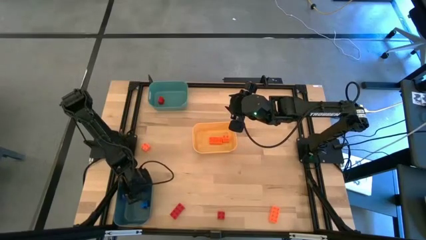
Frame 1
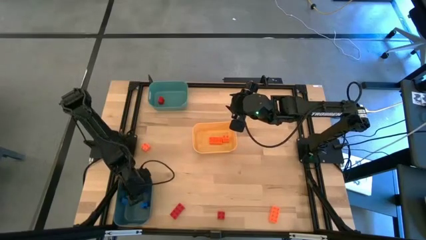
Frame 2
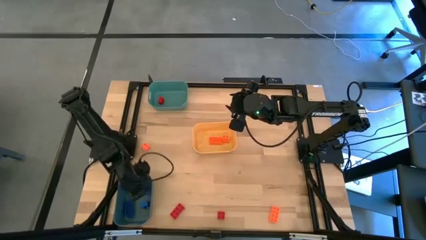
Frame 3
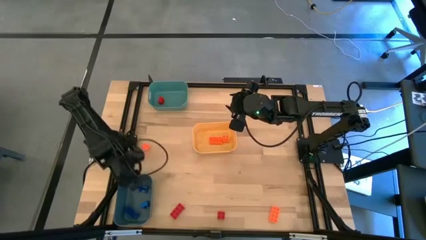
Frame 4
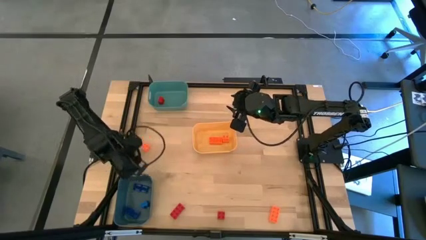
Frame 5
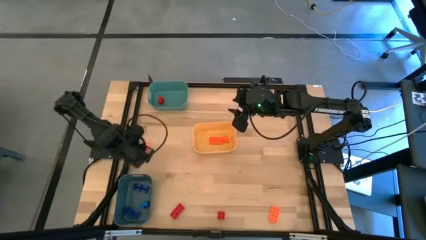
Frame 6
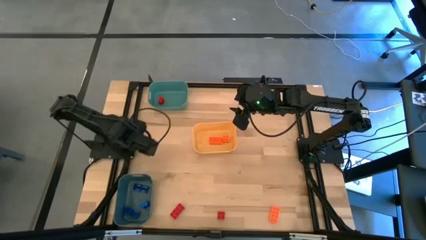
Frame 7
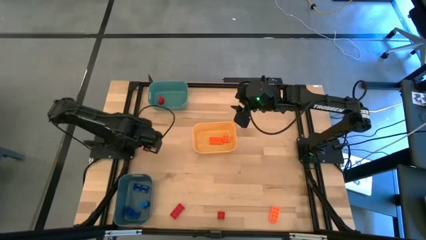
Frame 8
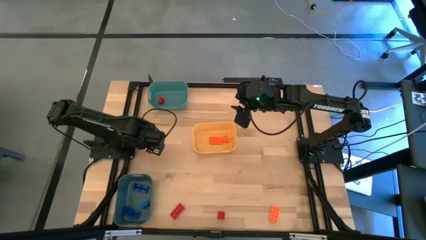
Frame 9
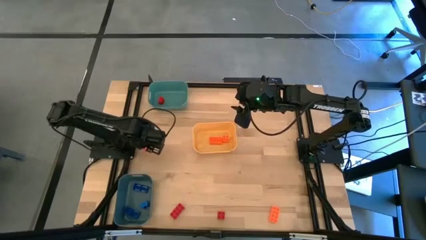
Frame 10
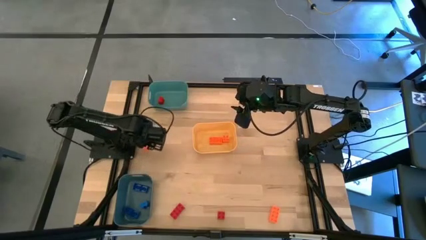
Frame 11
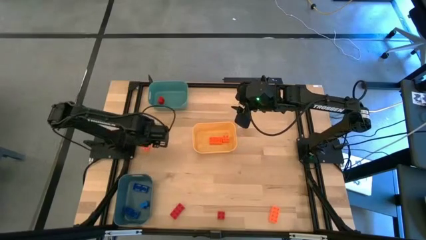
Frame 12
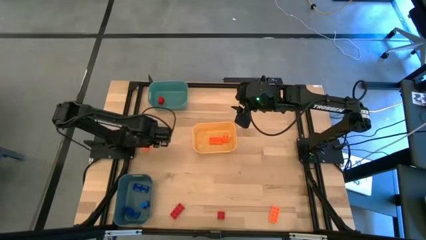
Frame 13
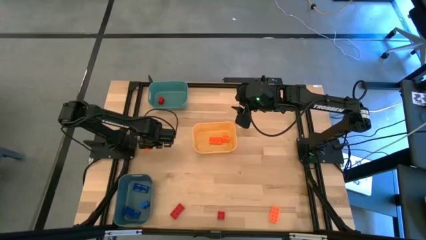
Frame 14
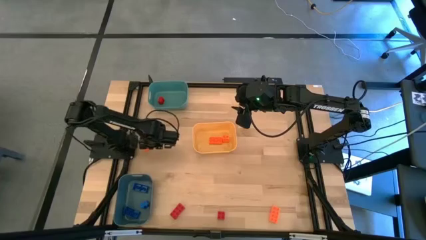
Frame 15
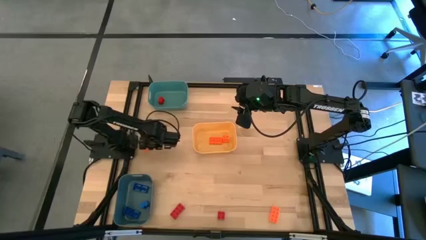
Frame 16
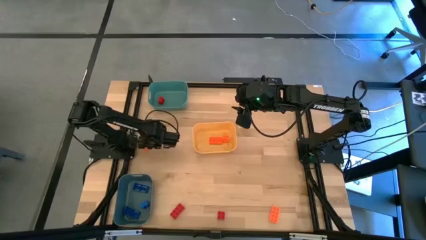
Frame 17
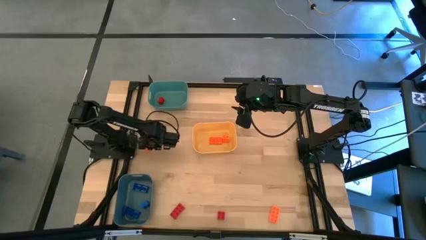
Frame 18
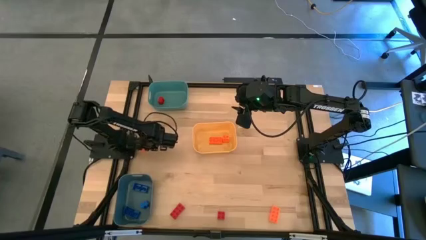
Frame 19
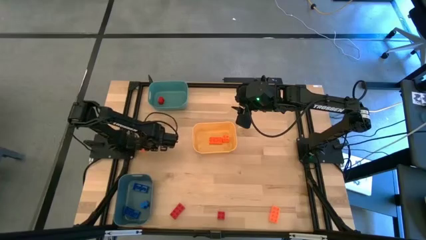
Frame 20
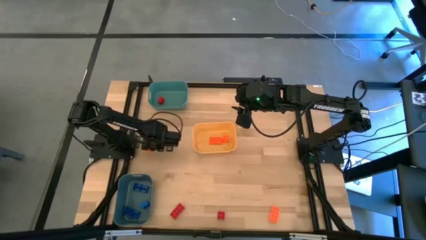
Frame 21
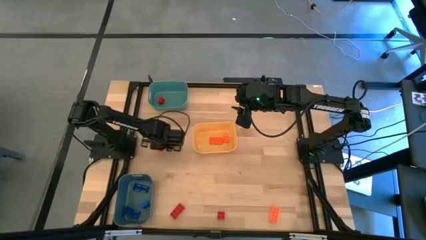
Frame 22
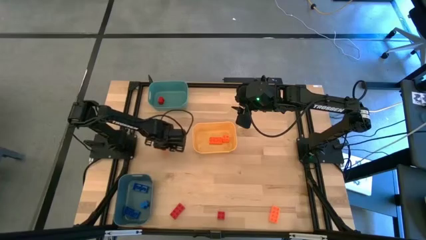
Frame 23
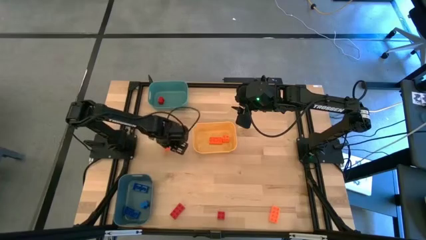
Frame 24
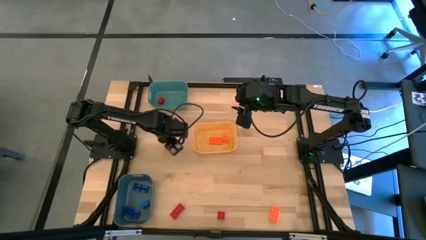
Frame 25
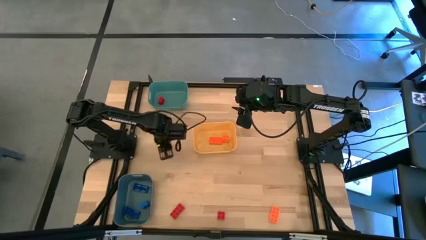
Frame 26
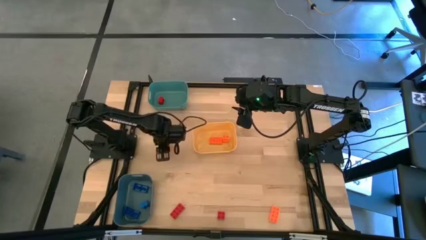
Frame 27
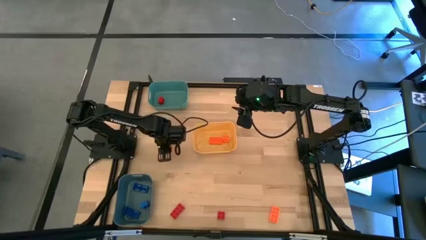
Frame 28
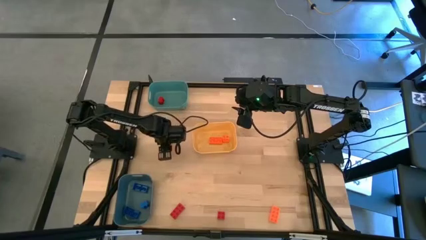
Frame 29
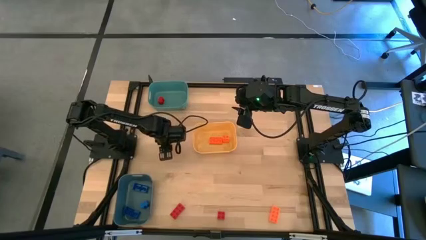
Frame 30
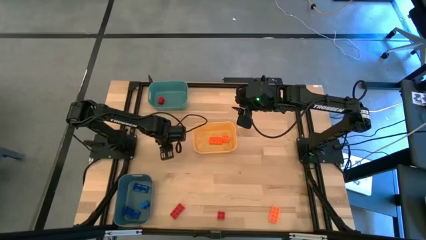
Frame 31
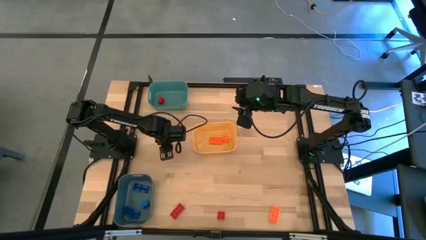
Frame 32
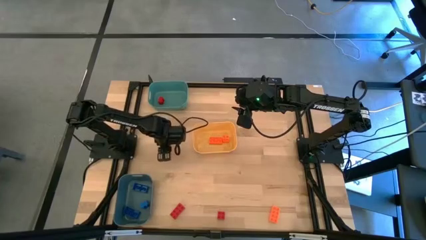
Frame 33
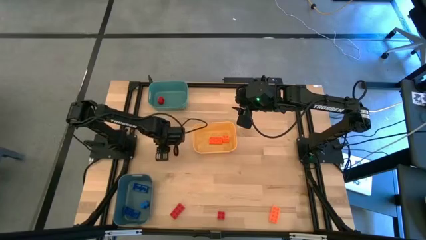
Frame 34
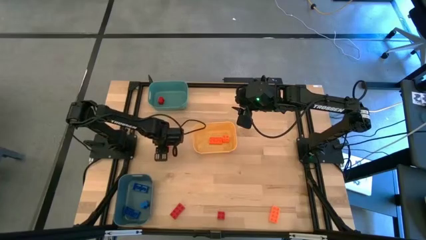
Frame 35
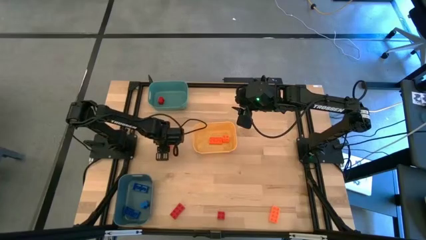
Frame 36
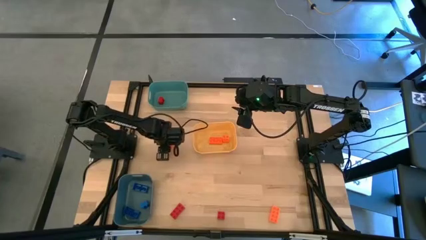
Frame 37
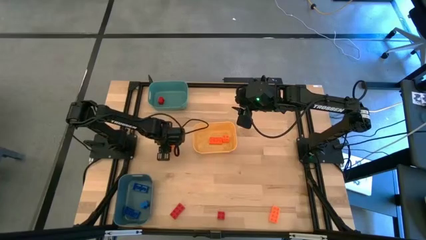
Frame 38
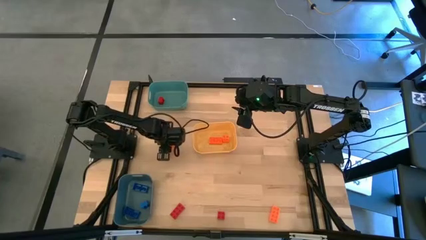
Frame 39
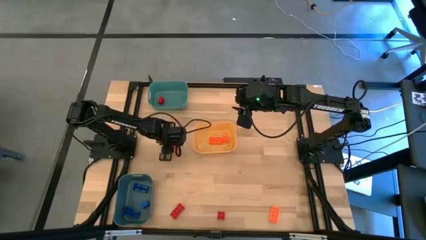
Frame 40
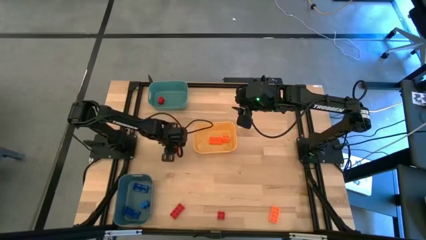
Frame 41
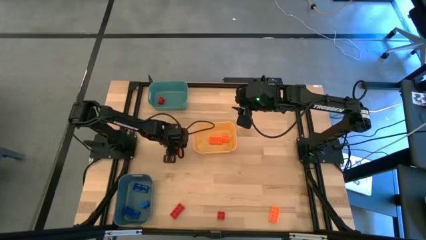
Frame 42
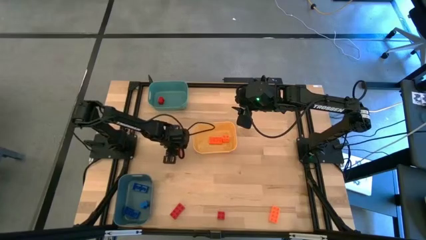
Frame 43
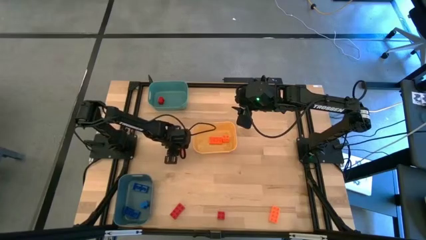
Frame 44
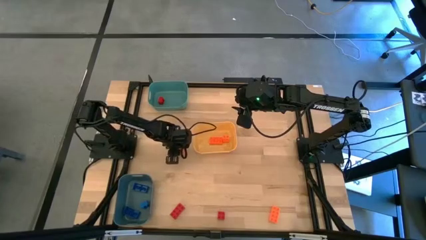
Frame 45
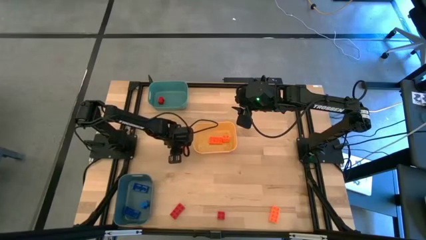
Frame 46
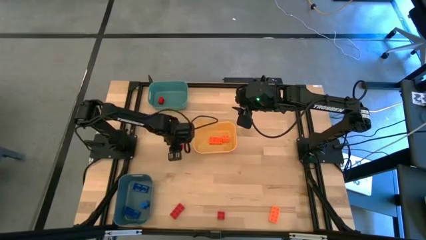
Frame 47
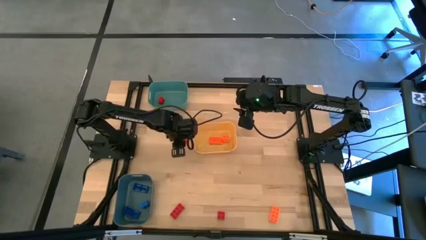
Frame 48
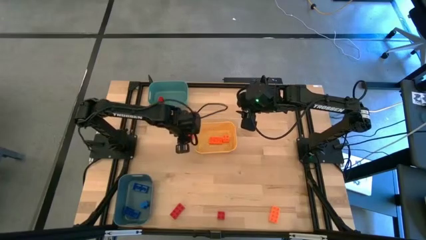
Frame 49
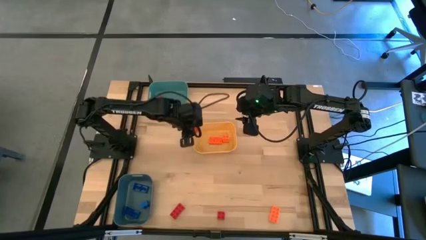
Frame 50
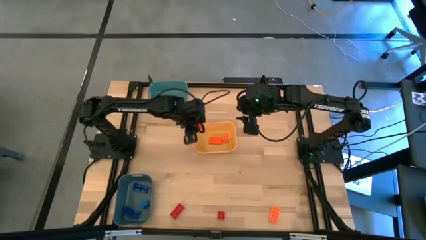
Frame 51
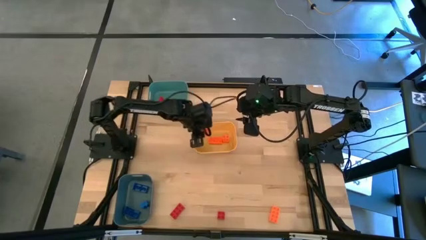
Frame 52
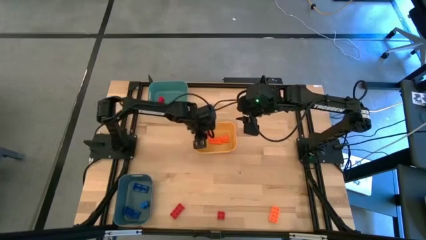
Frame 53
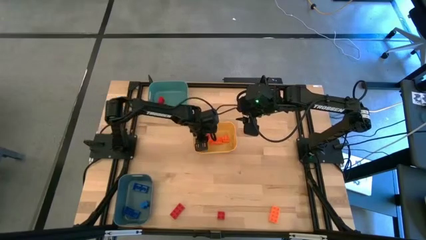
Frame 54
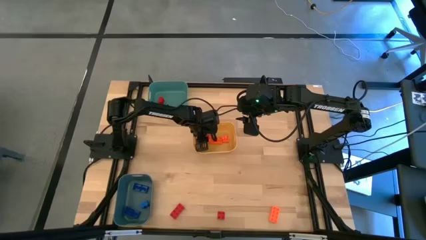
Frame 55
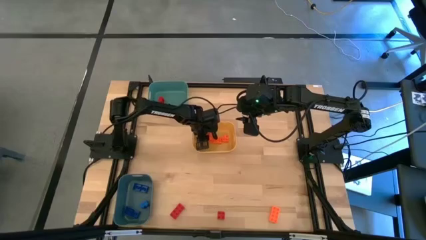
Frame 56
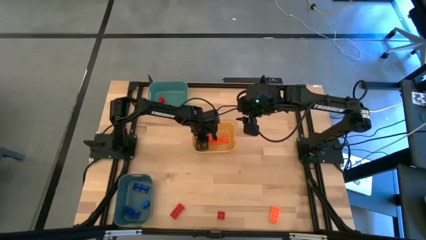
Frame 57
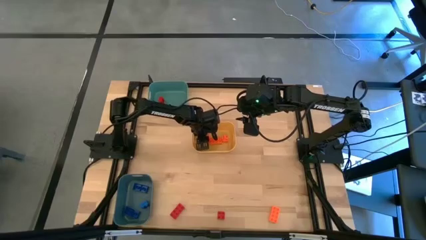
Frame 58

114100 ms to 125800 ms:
Task: Sort & place blocks by color
Put the orange 4 stud game piece into the yellow bin

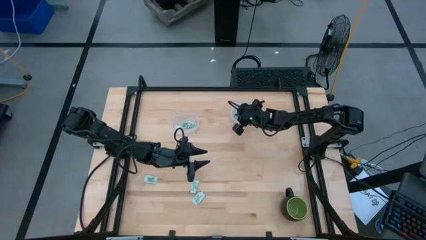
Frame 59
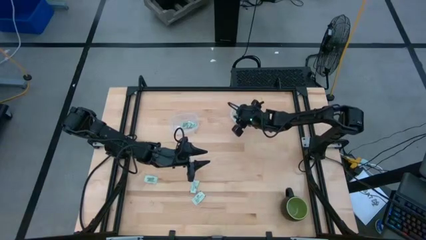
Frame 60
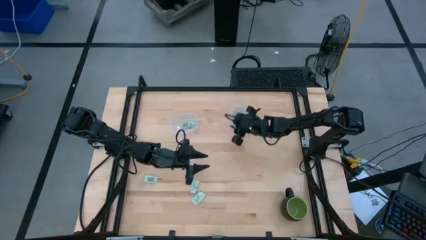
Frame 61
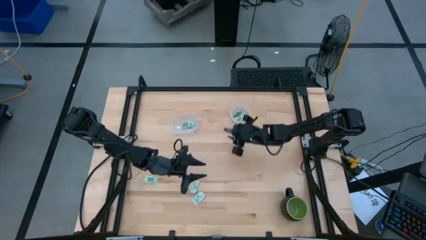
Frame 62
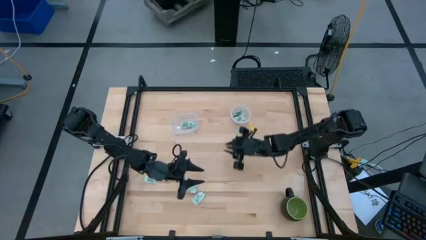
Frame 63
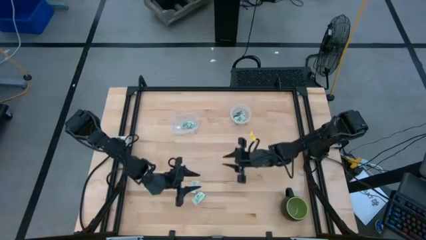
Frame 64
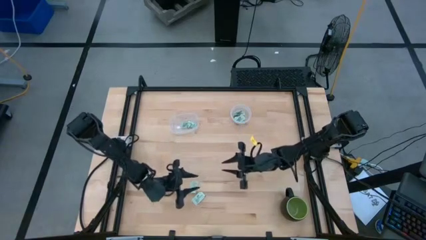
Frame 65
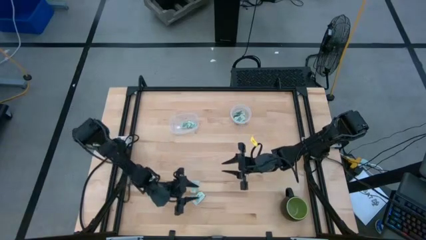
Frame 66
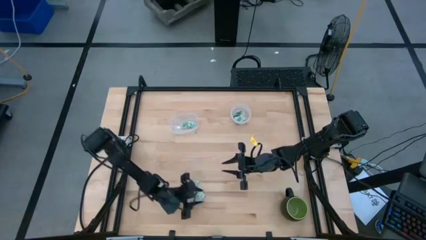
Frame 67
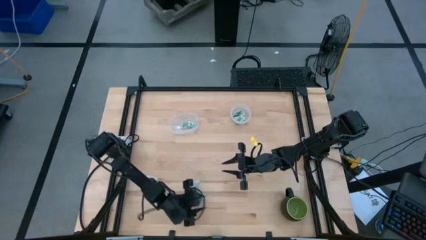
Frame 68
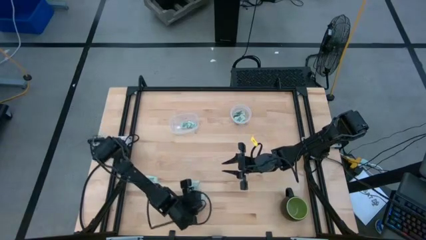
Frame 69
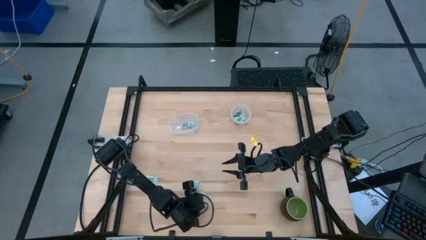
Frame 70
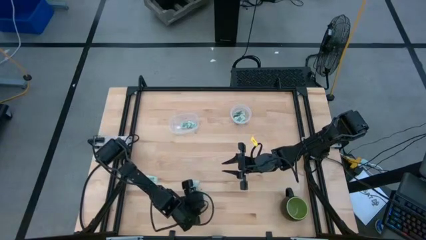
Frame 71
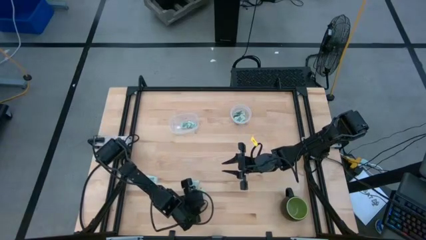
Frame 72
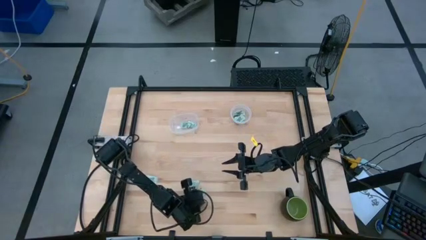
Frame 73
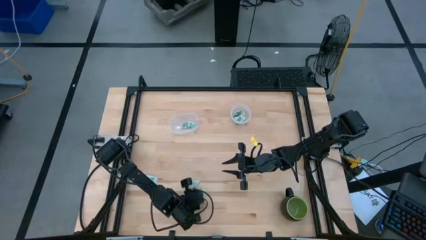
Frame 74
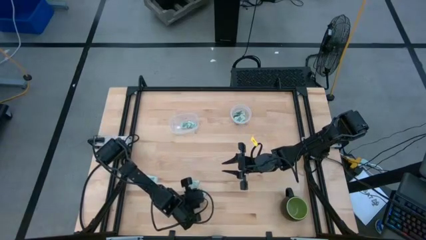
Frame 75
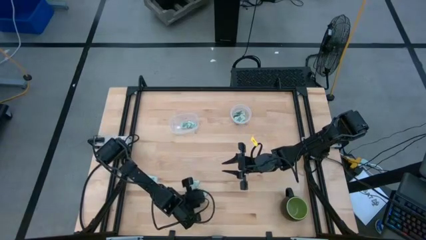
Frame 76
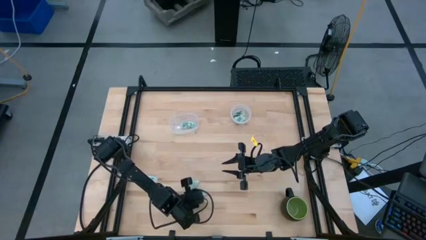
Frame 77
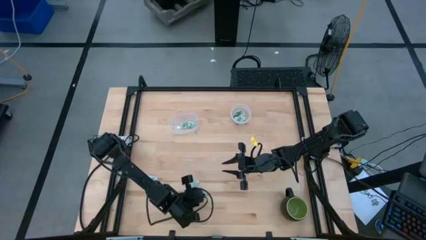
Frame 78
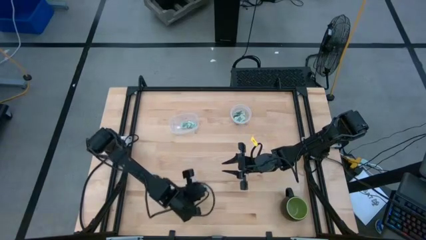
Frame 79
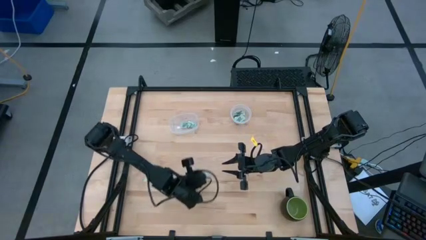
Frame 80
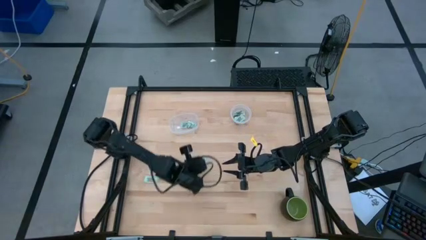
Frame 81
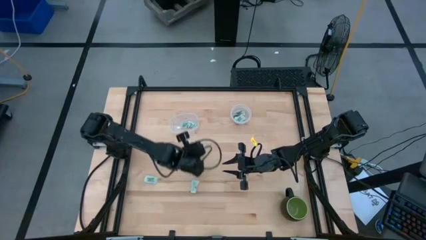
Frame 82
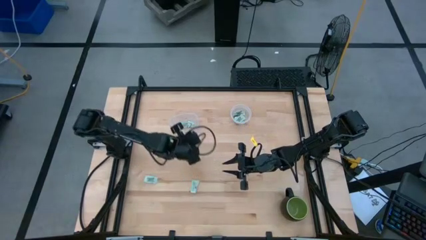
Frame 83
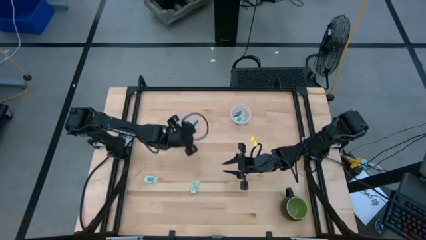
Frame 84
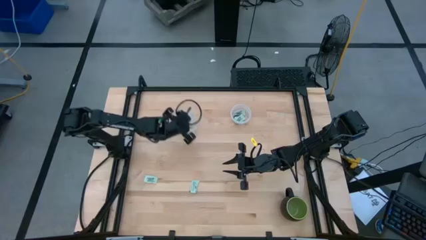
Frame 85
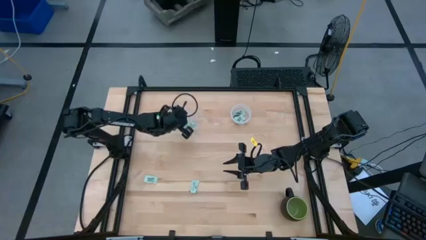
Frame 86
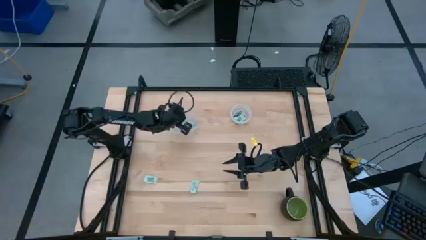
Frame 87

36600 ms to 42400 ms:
Task: Pick and place Stevia / Truvia into bins
Put the stevia packet into the left transparent container
